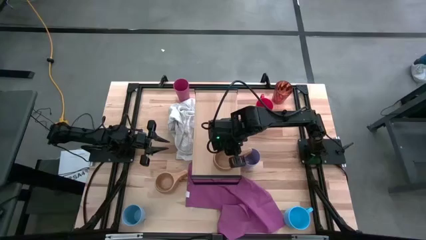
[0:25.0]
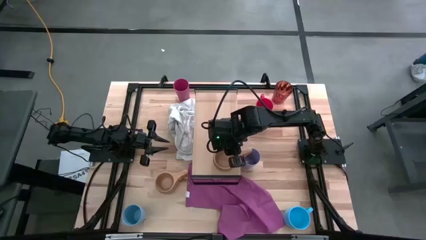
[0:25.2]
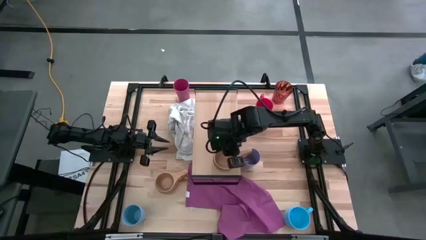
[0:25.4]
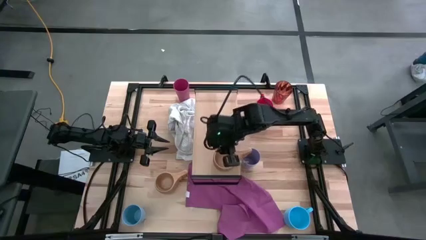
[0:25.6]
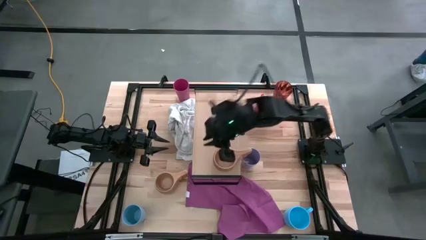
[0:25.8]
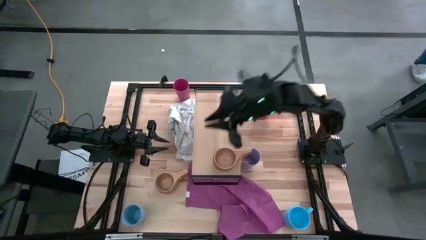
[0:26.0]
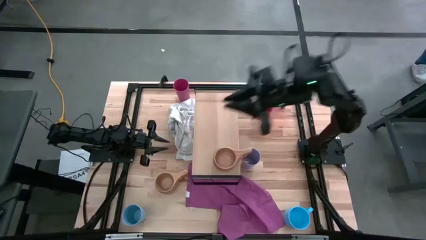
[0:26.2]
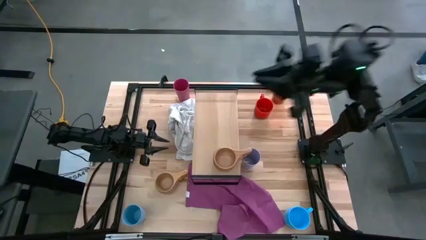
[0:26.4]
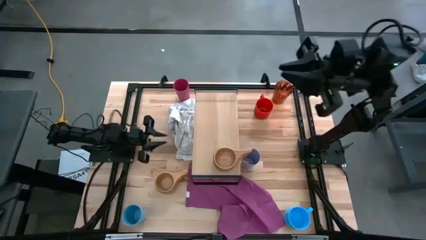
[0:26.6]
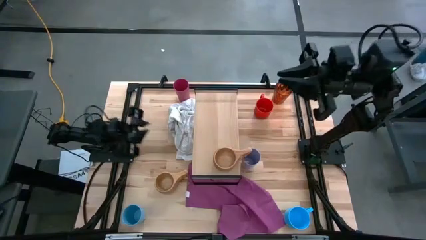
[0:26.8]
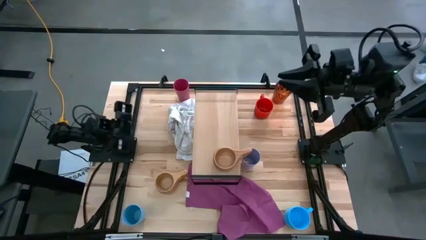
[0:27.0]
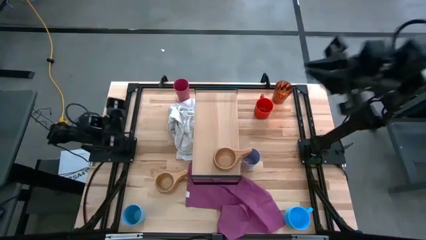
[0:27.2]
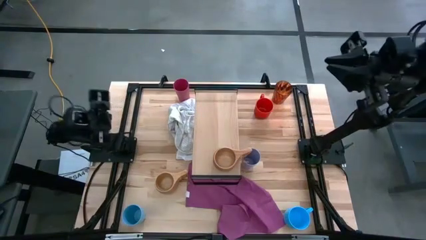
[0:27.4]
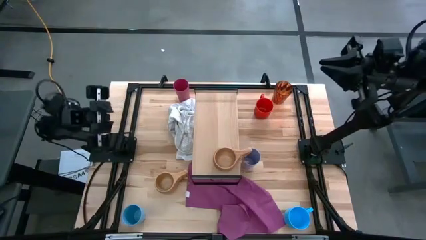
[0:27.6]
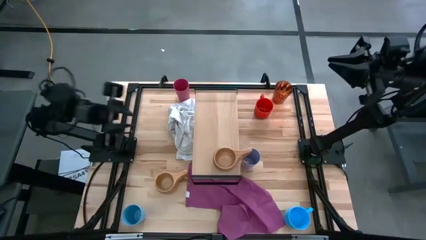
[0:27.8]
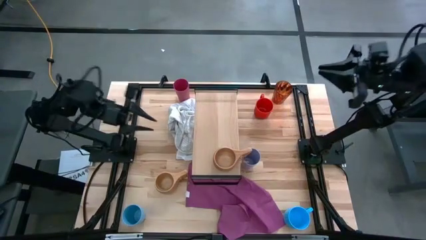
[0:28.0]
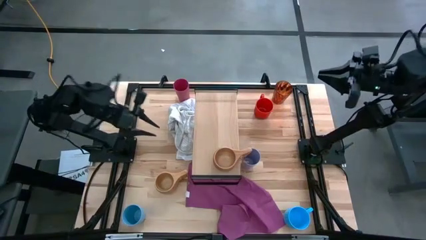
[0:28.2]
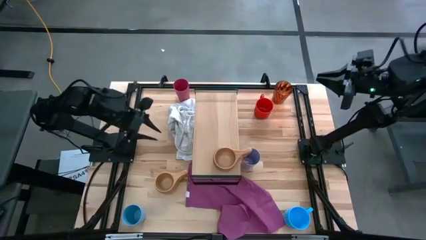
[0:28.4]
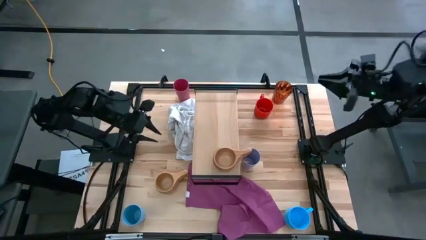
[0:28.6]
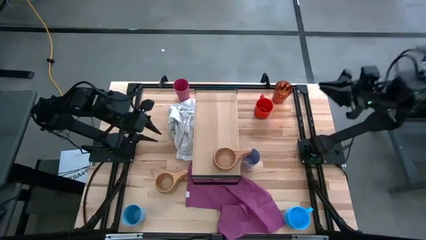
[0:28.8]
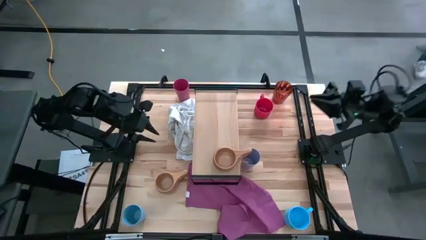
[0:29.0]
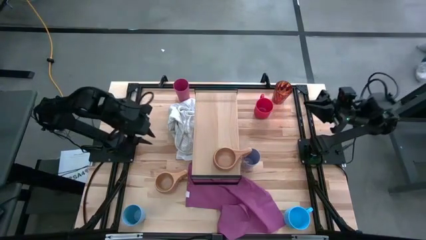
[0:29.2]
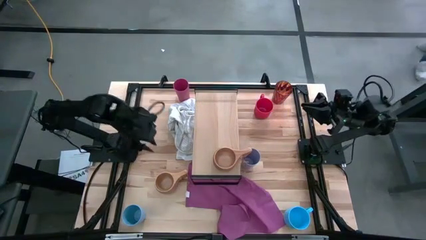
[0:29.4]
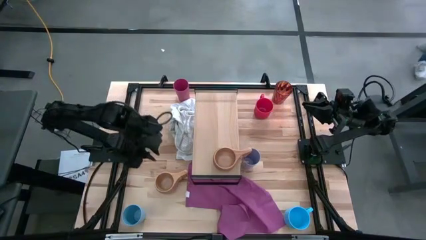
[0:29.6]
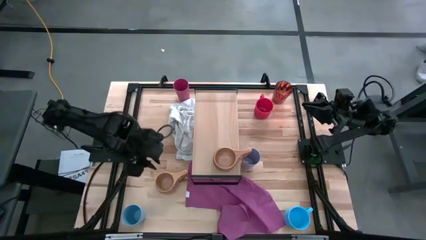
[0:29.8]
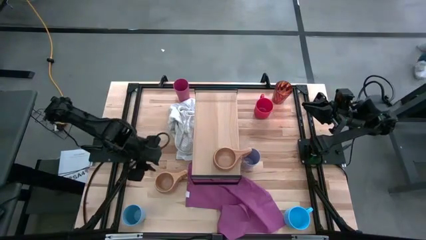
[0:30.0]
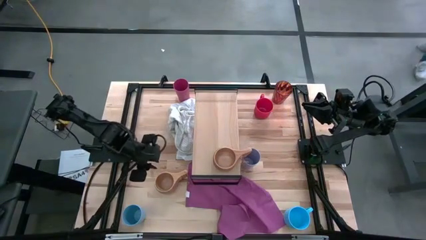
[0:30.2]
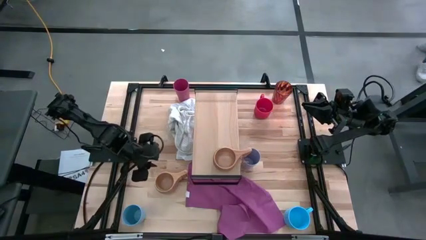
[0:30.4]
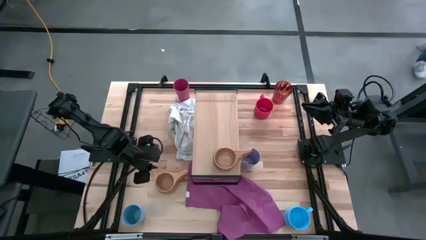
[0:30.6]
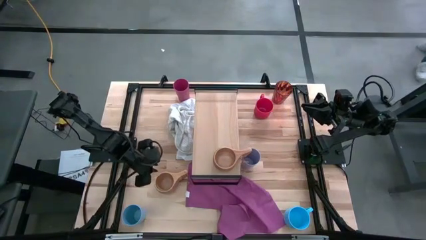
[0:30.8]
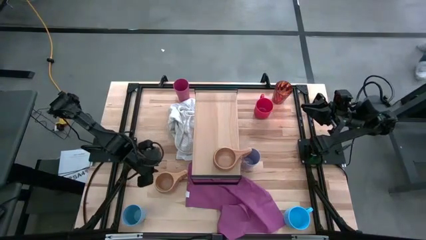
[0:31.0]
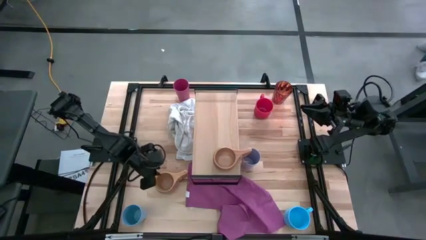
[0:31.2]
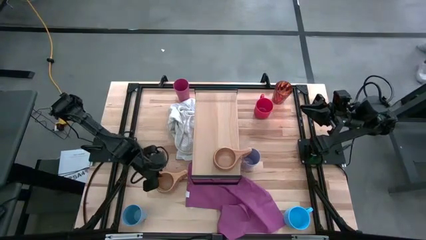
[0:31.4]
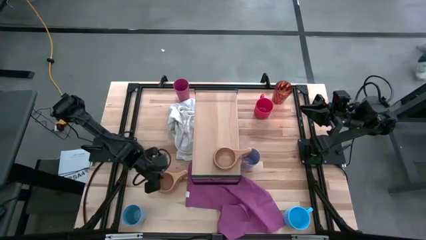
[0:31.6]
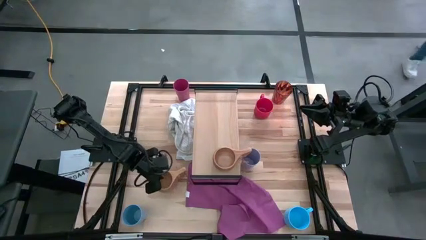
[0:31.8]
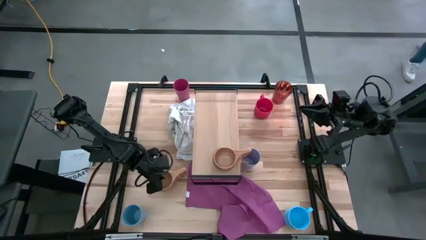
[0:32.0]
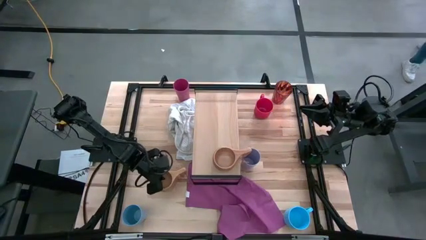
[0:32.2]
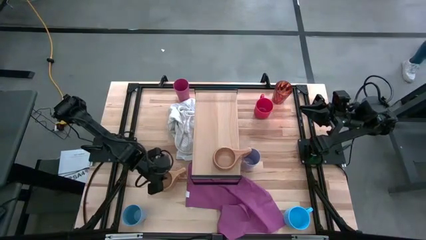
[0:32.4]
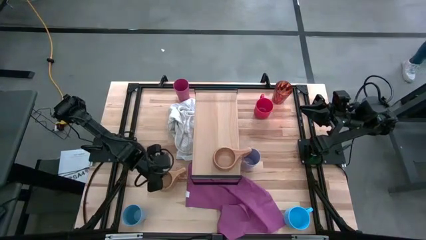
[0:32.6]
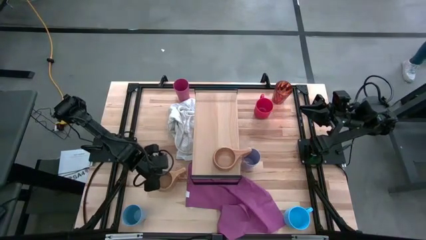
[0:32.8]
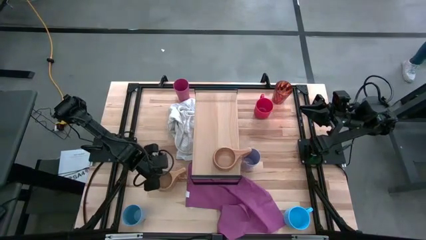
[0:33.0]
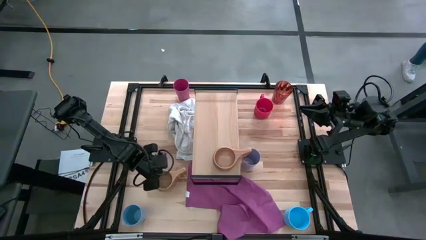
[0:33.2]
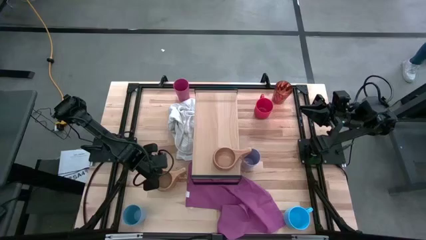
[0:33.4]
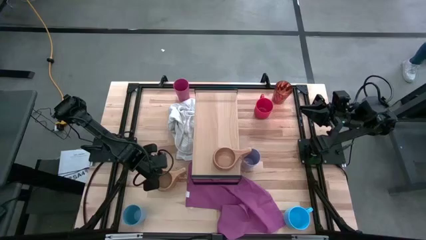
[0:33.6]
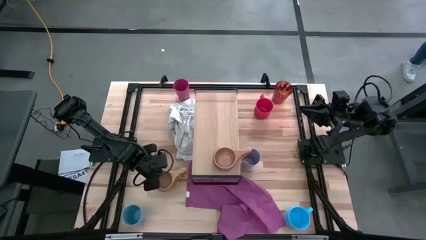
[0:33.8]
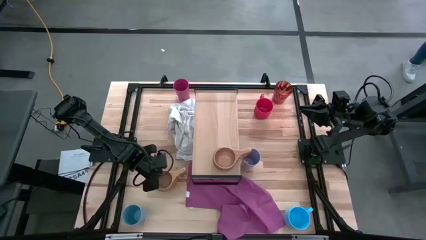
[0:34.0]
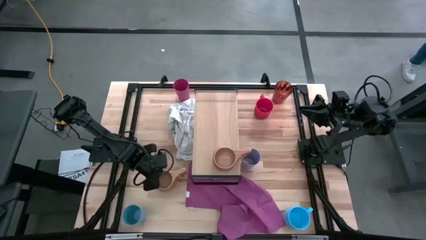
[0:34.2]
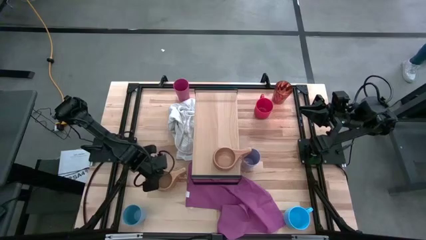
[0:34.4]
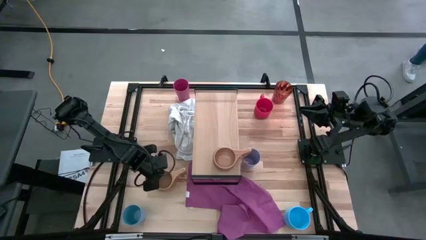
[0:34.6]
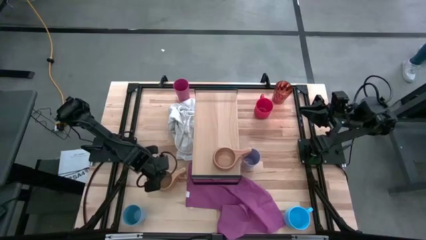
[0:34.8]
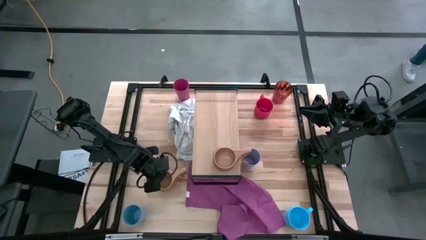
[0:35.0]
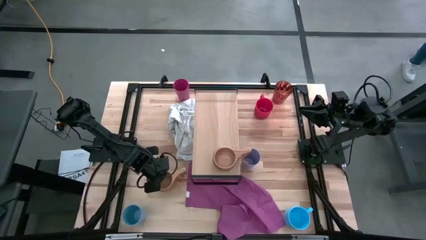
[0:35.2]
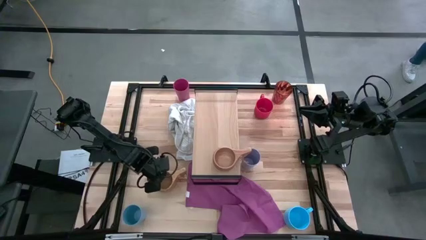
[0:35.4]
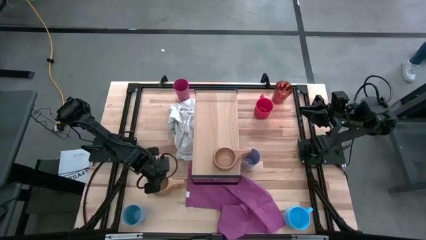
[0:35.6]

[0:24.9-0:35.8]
Task: Stack small to large cups/mugs on shelf
Put the brown mug on the shelf
